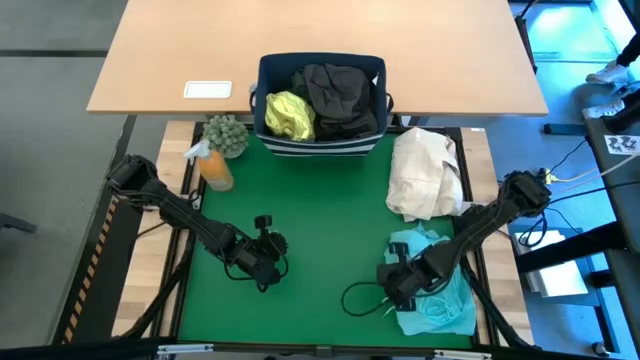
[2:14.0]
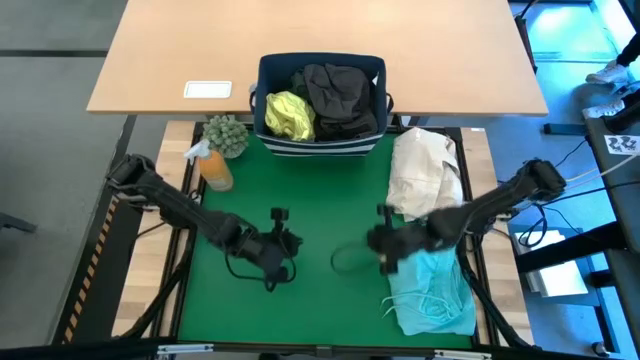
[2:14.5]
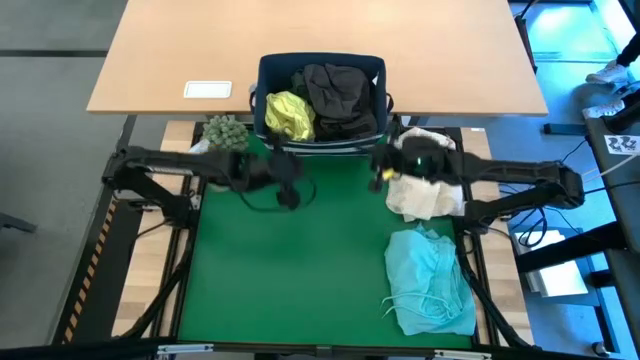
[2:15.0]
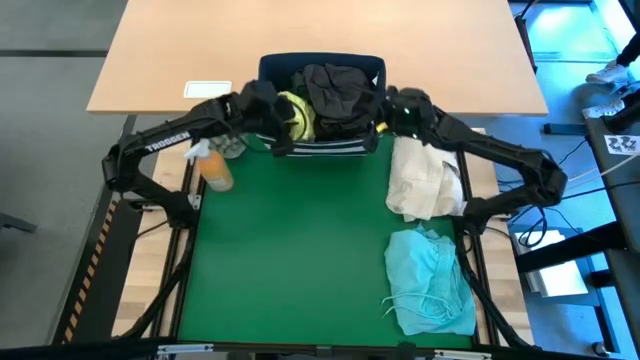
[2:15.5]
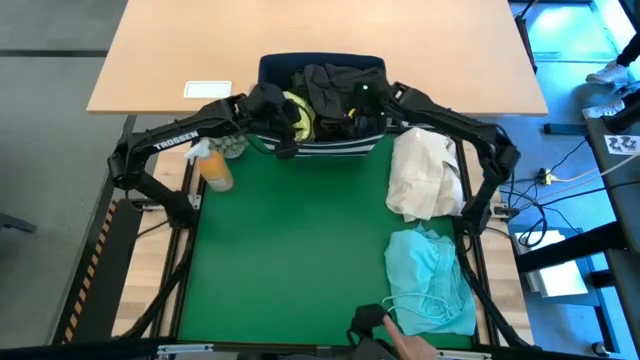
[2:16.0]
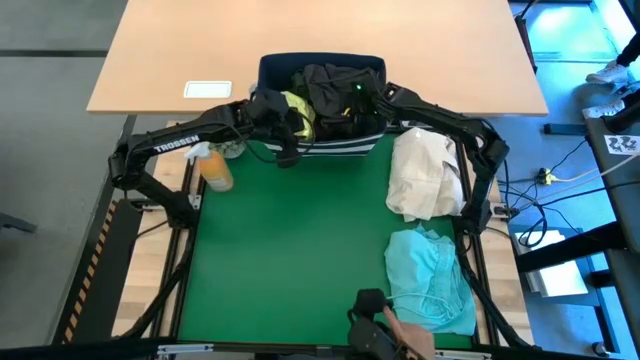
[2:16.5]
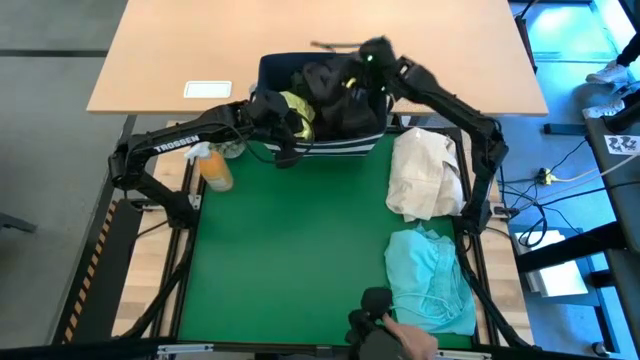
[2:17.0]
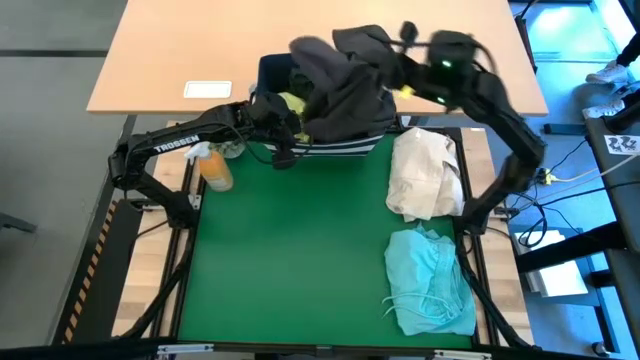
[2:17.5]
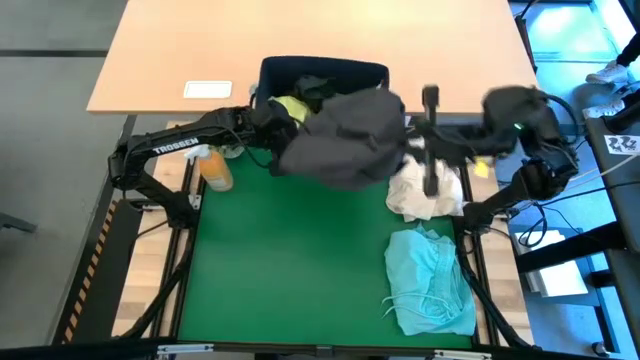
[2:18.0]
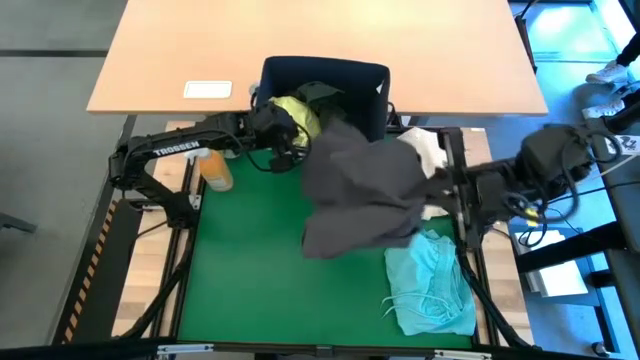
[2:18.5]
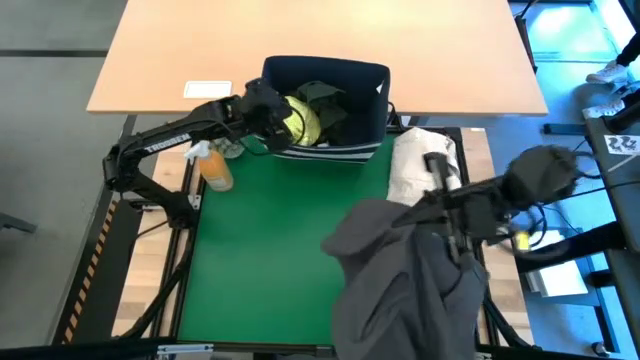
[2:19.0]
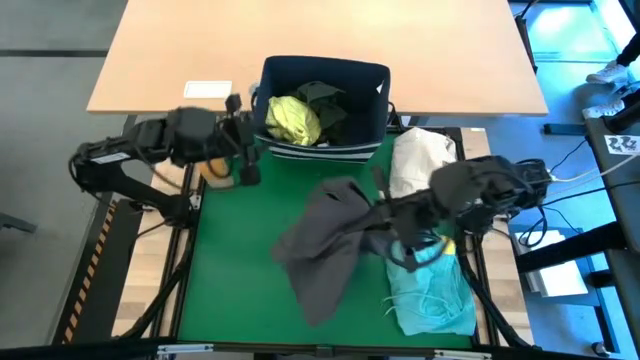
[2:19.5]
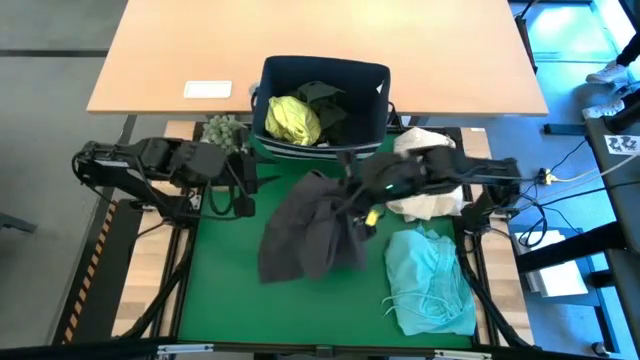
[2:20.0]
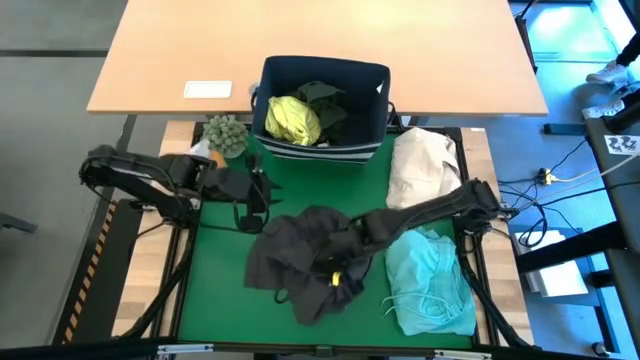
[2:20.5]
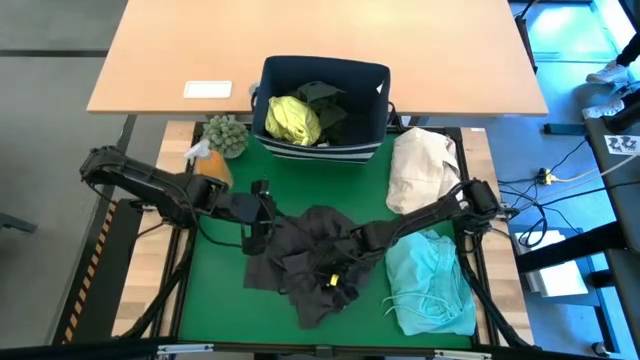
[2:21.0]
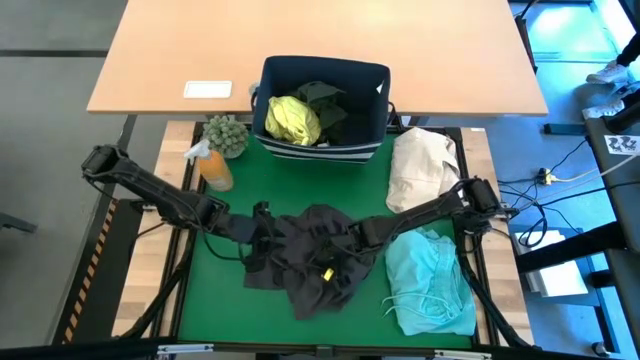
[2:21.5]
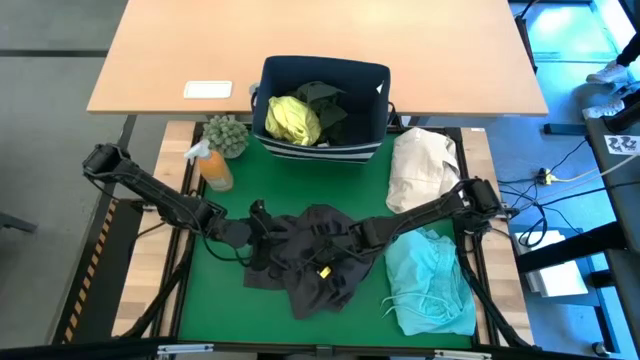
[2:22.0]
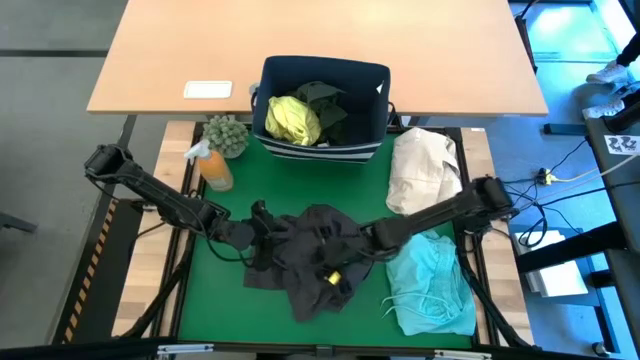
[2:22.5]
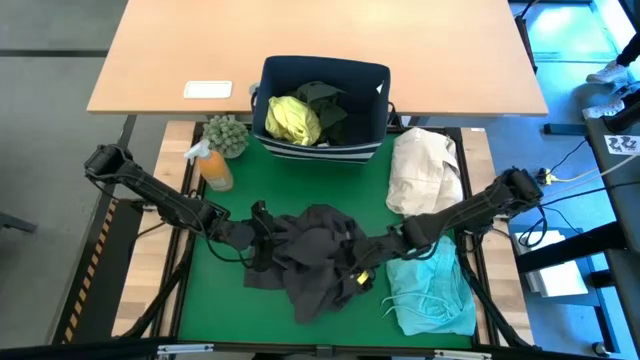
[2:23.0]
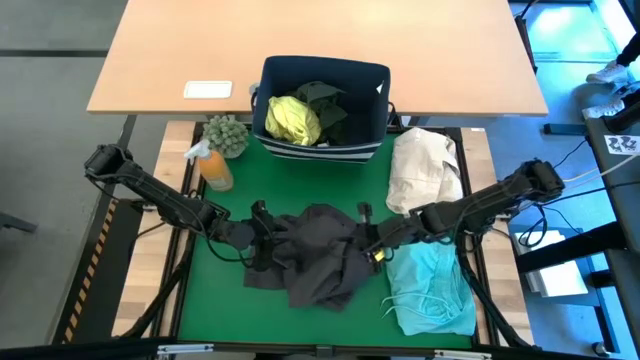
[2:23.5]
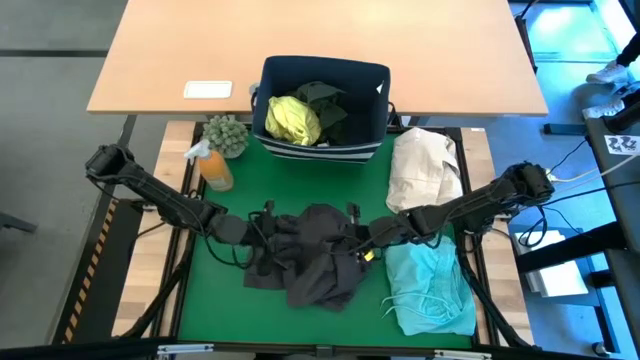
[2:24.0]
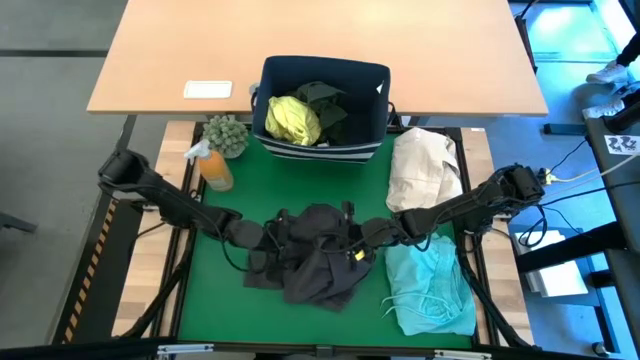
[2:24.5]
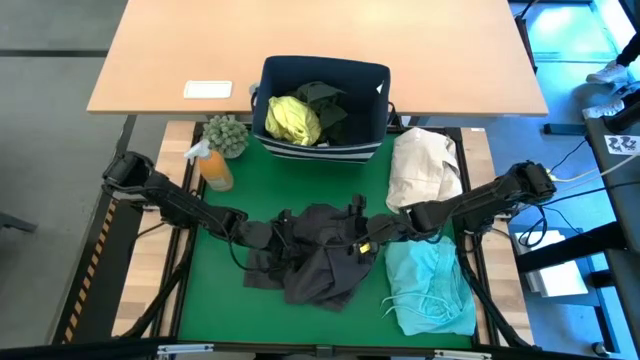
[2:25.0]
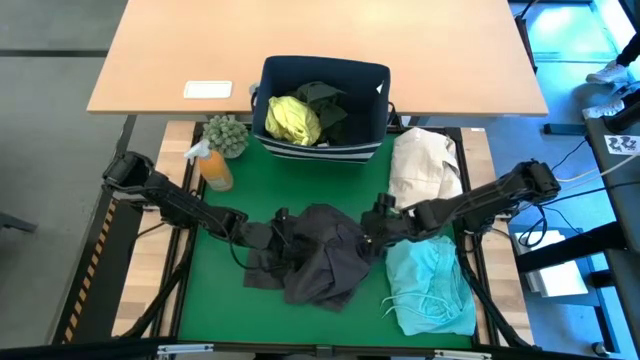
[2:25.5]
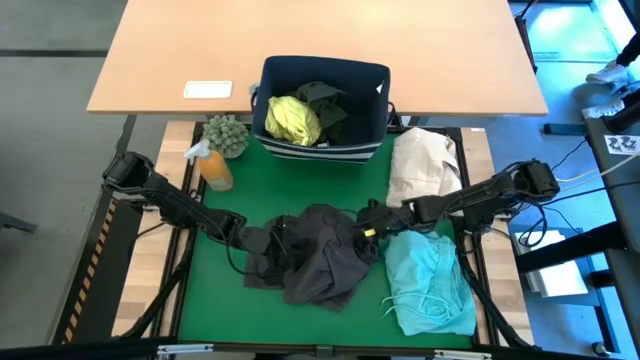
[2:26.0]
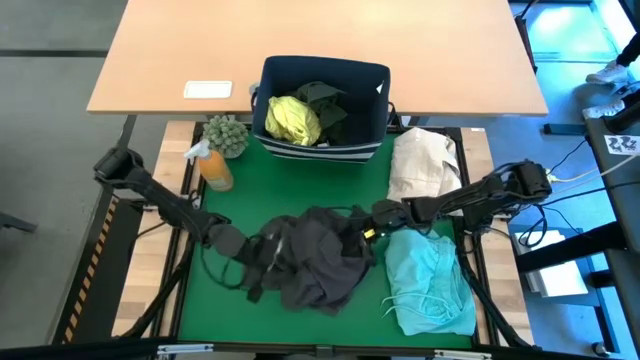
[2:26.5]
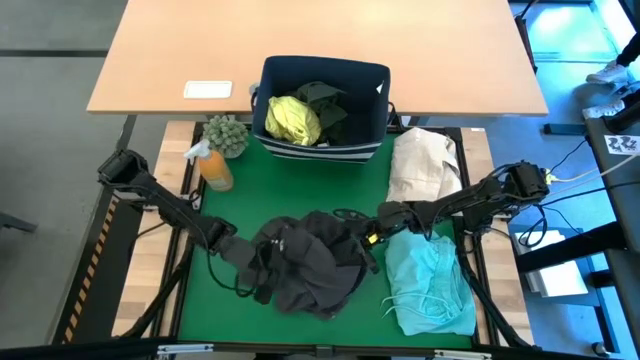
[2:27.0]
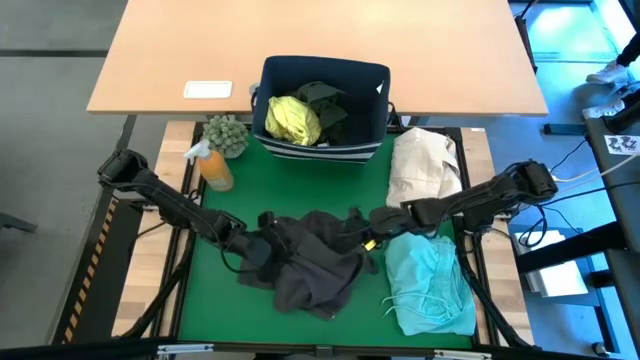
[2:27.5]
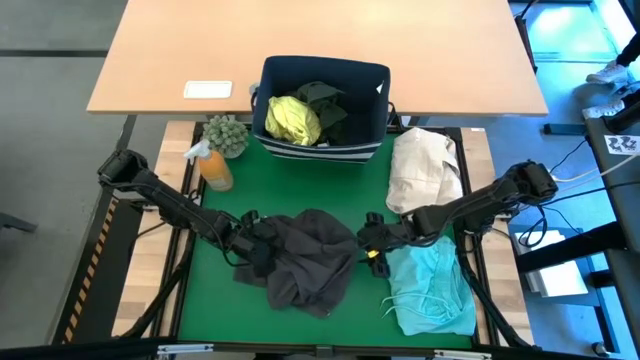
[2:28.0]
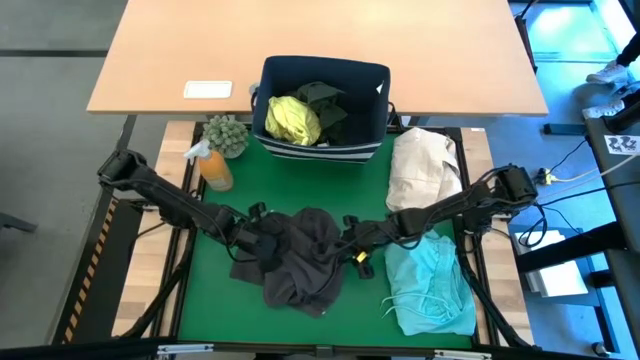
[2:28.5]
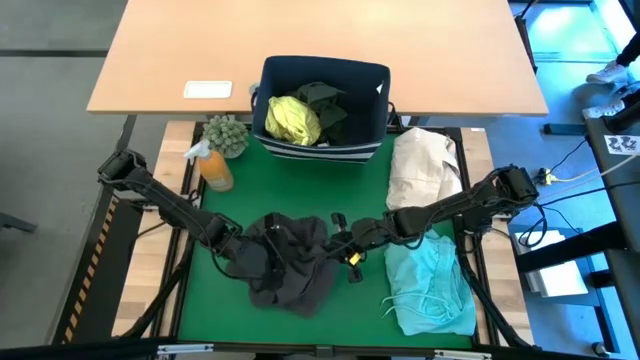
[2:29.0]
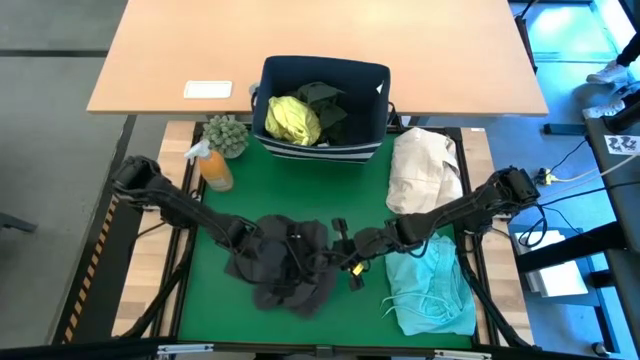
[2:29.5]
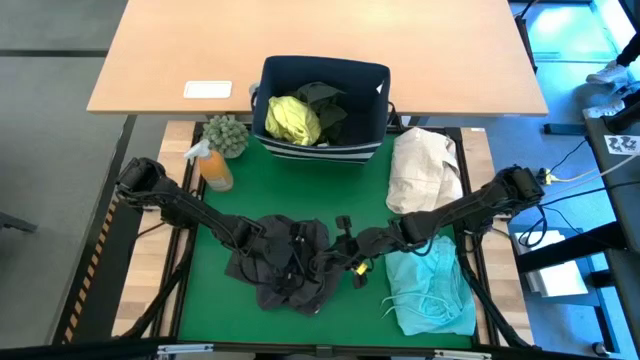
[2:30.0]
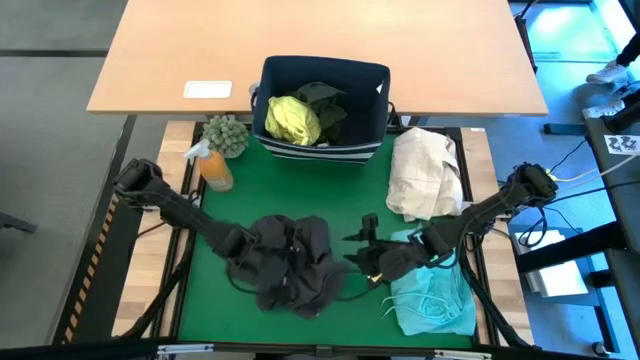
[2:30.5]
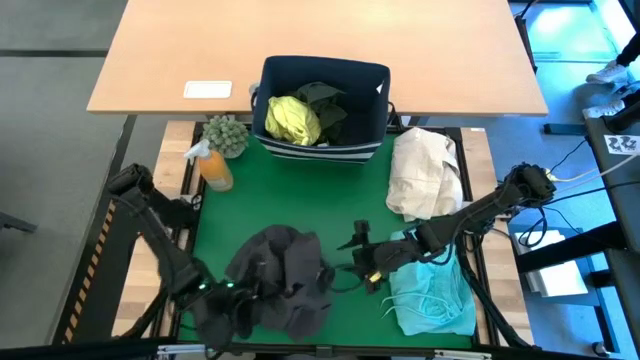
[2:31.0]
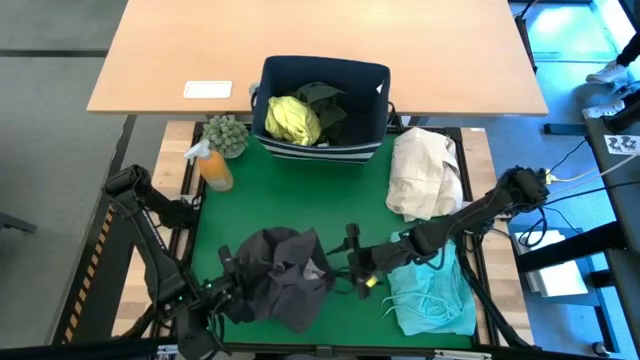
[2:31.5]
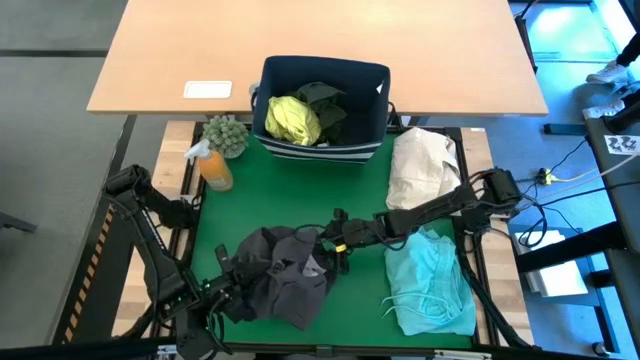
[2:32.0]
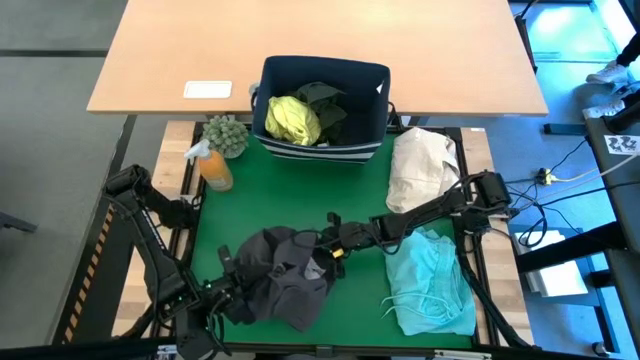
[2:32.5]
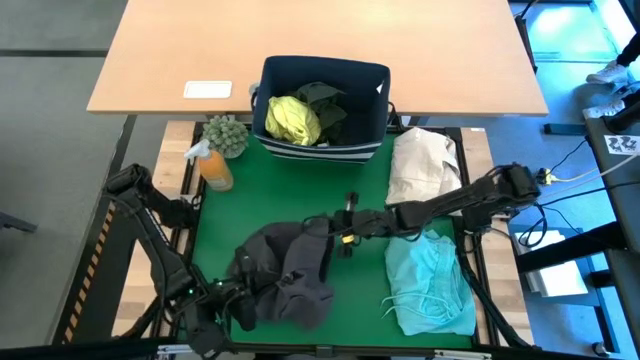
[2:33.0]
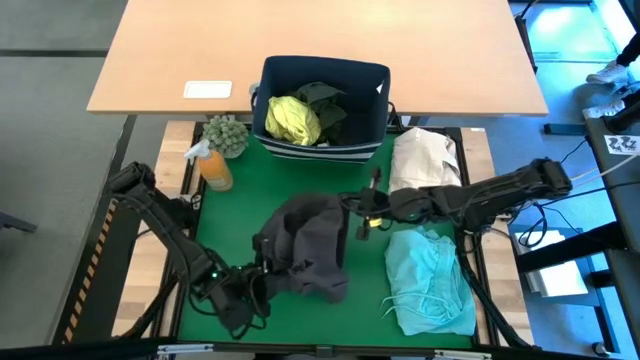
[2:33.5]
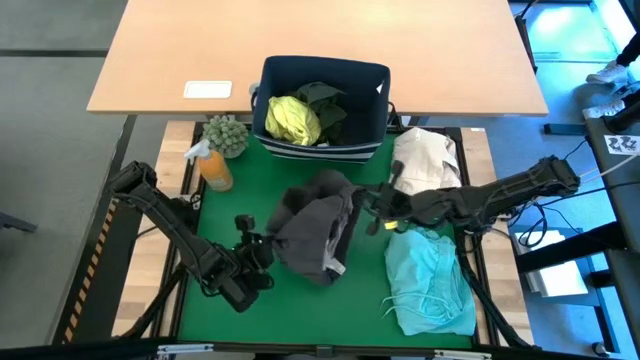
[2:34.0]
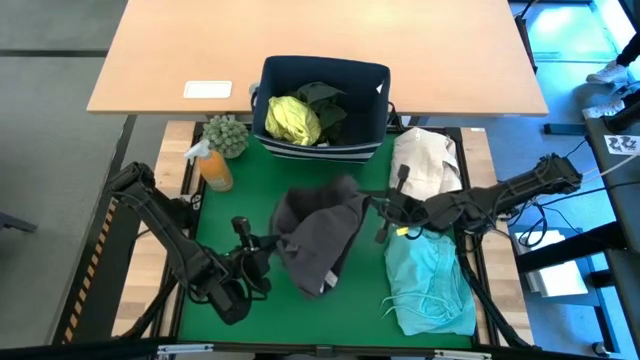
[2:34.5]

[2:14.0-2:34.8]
Task: Fold laundry
Fold the black shorts
